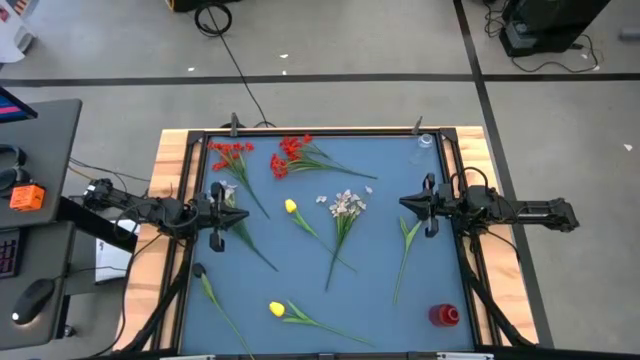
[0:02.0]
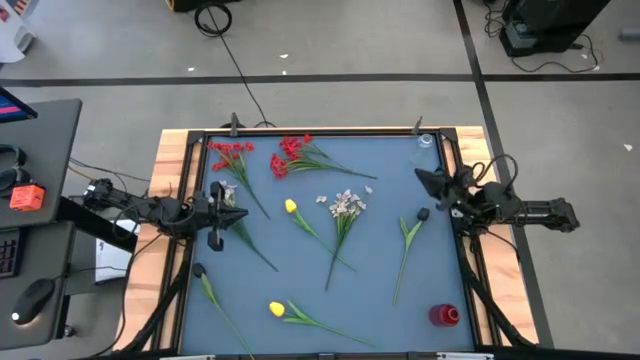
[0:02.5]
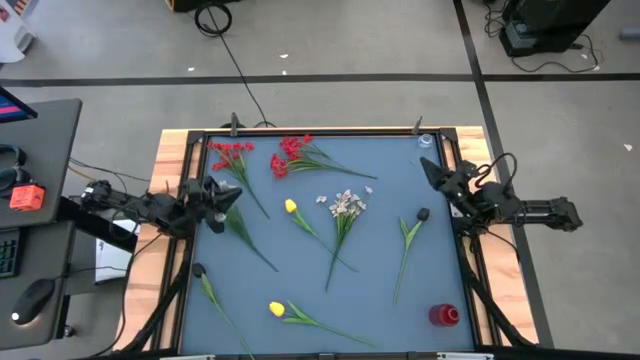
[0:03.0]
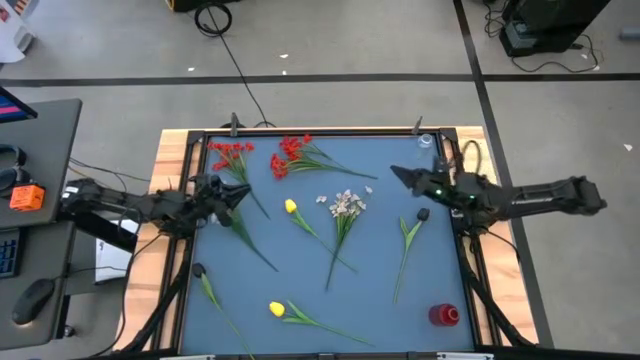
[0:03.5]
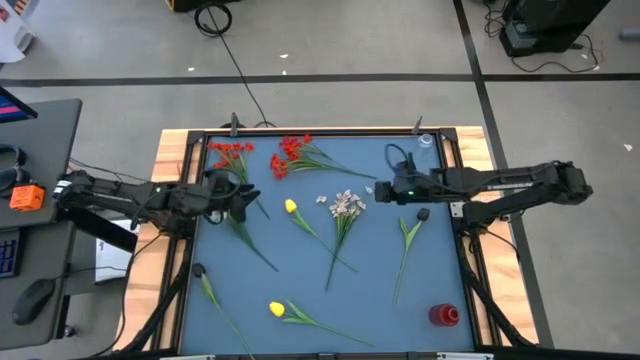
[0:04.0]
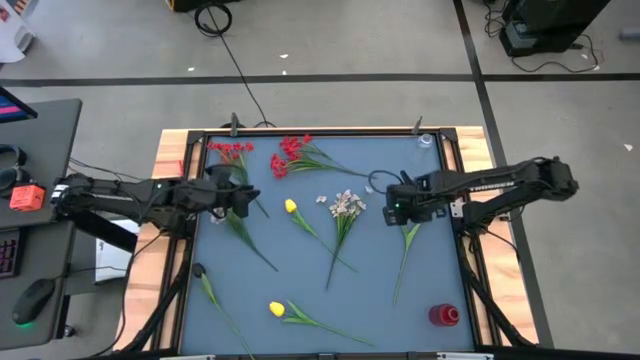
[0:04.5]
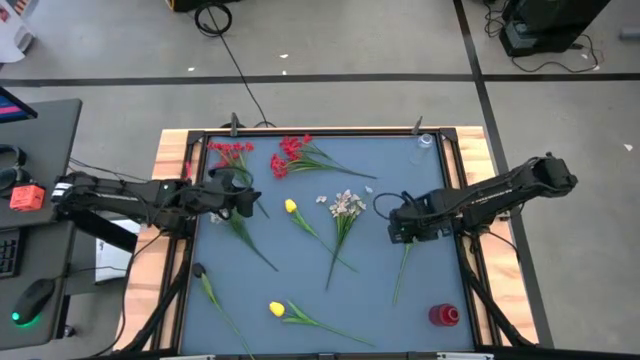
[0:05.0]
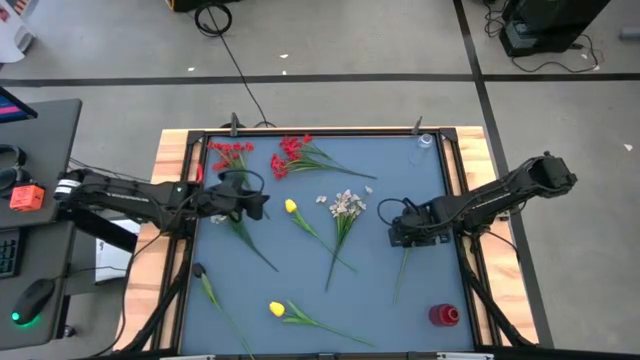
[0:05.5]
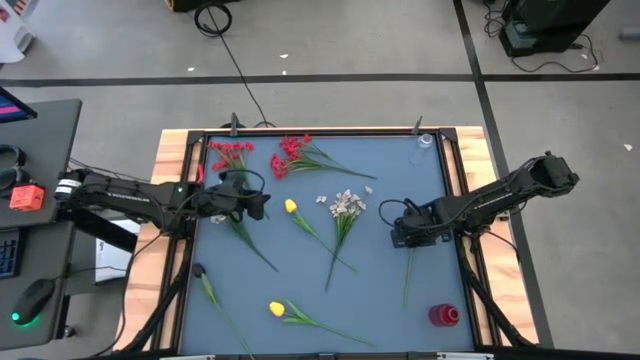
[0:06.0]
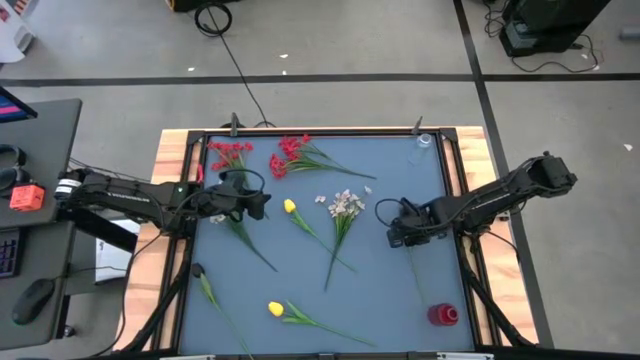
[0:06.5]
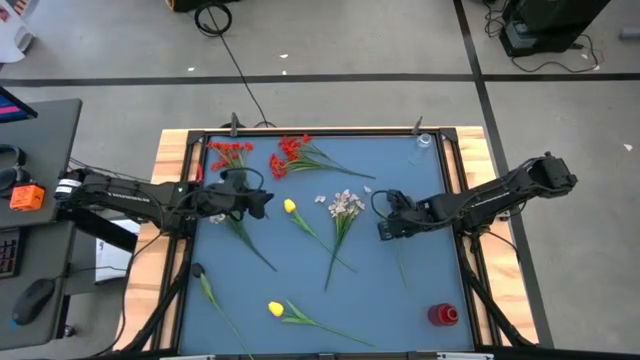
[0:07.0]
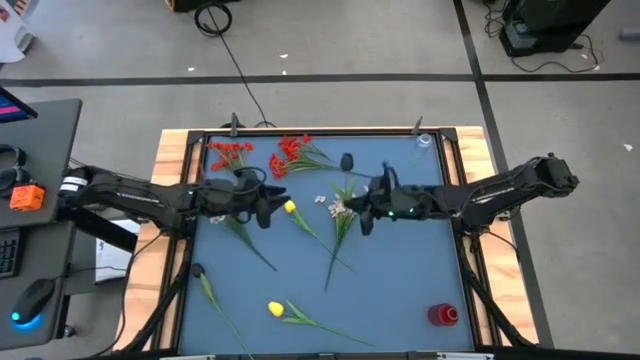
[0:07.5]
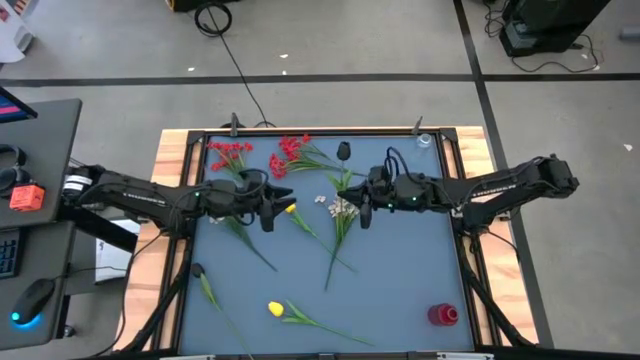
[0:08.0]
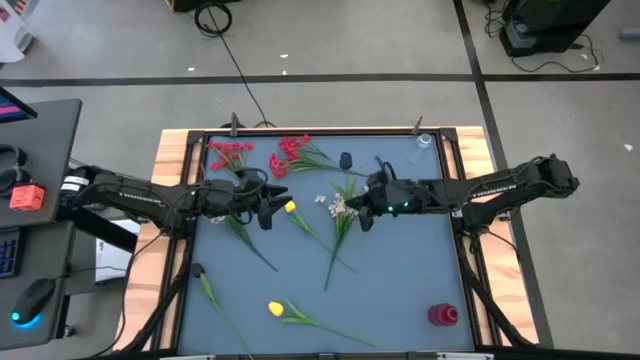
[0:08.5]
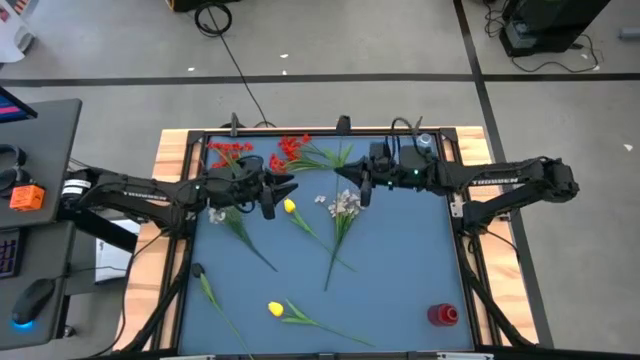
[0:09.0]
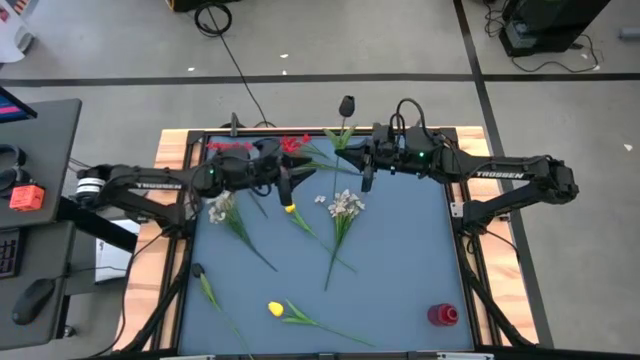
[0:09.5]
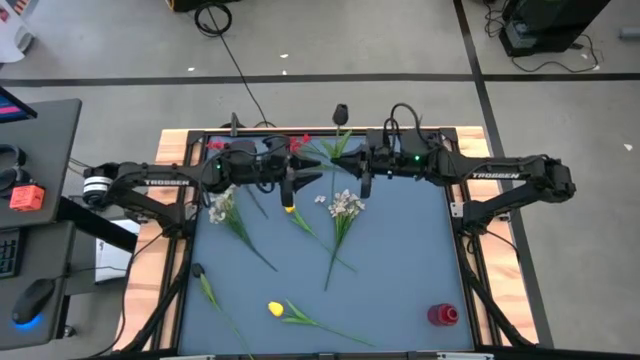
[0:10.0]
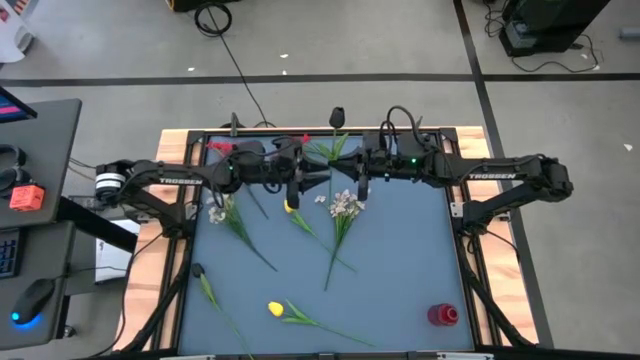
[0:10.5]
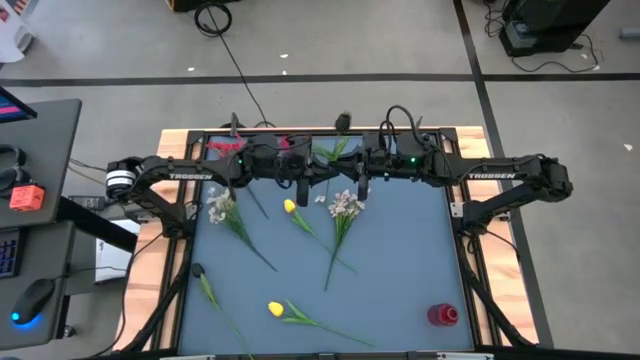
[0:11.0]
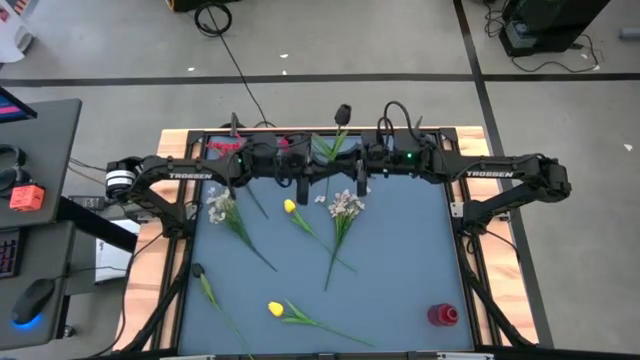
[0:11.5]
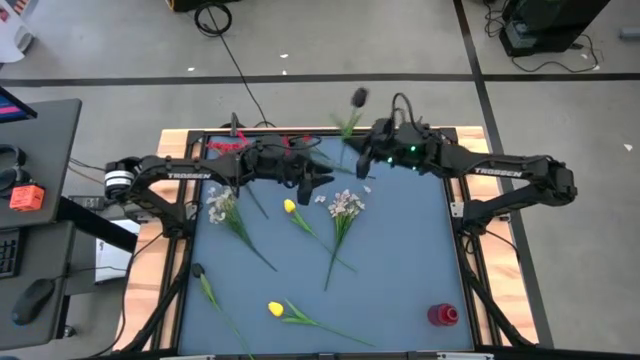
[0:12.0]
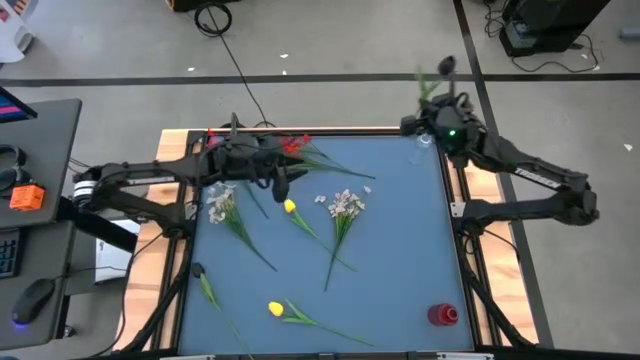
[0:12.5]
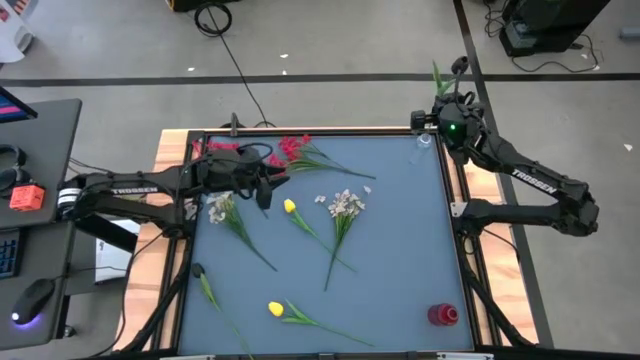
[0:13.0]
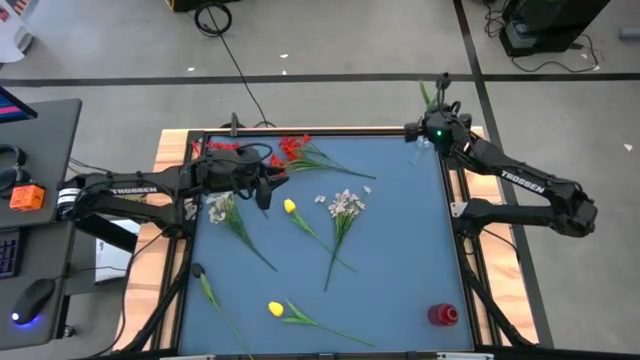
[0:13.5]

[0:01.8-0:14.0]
Task: Sort flowers into vase by color
Put the right black flower into the transparent vase

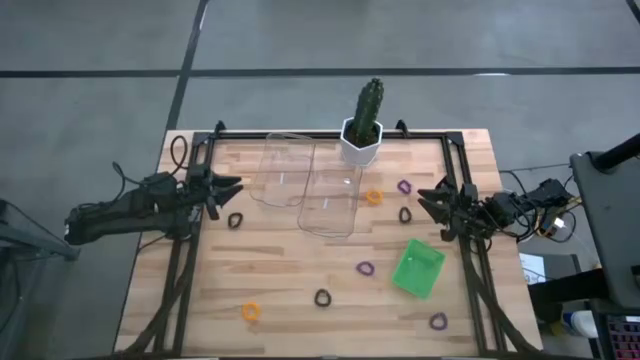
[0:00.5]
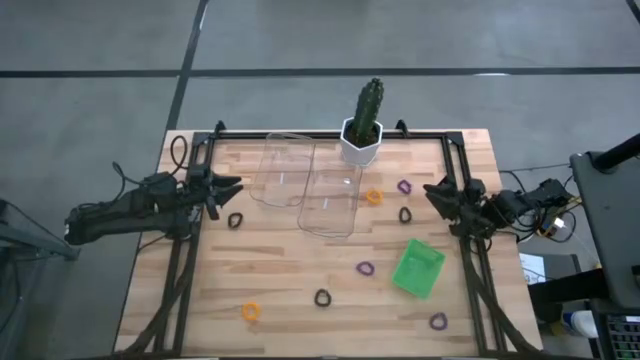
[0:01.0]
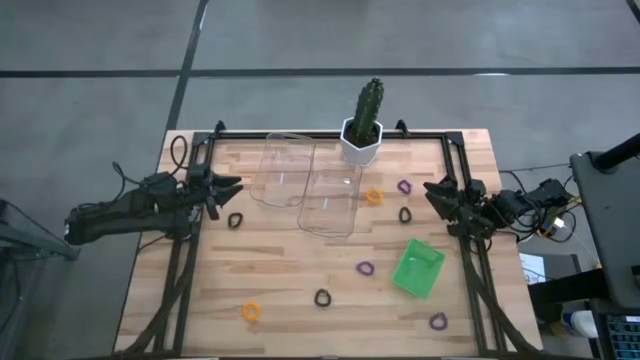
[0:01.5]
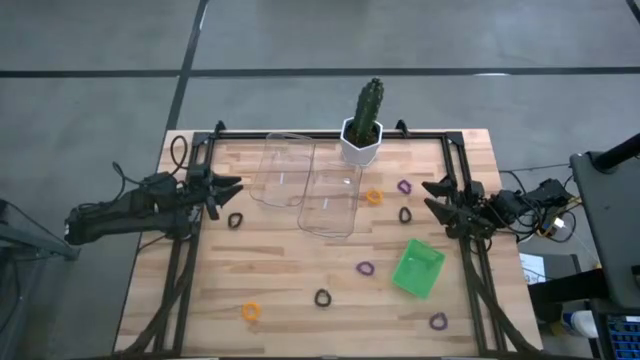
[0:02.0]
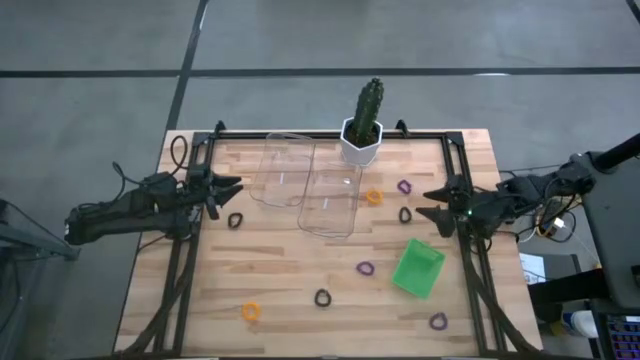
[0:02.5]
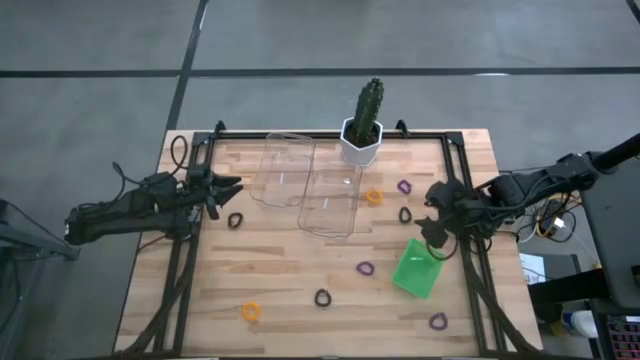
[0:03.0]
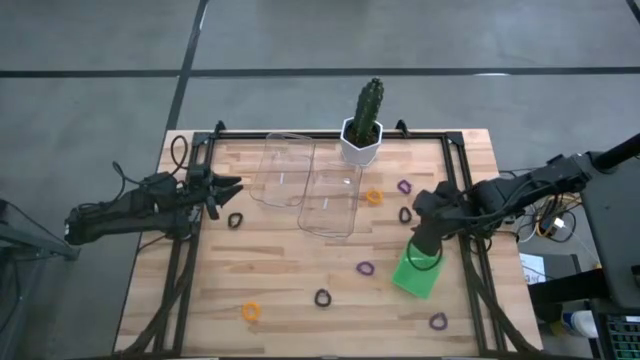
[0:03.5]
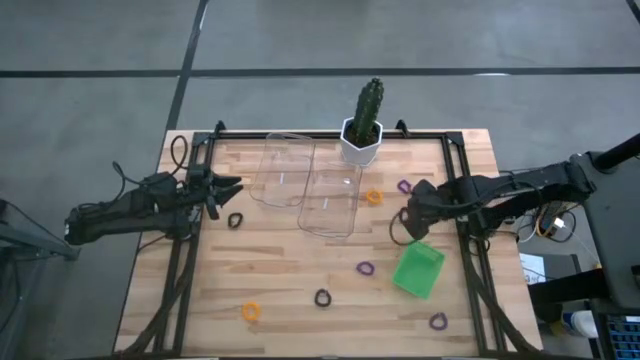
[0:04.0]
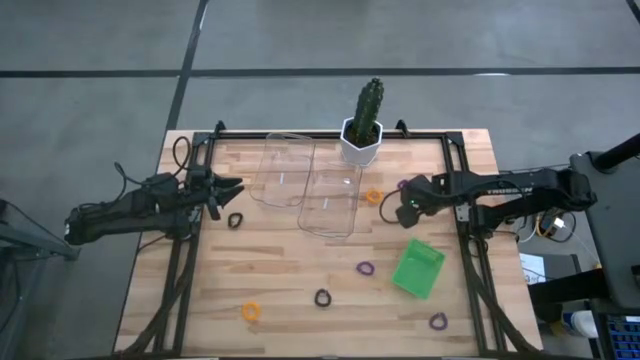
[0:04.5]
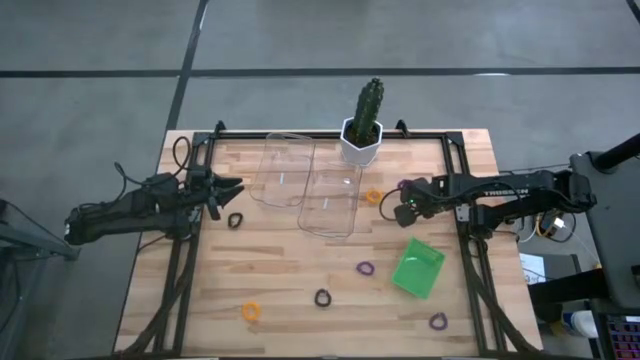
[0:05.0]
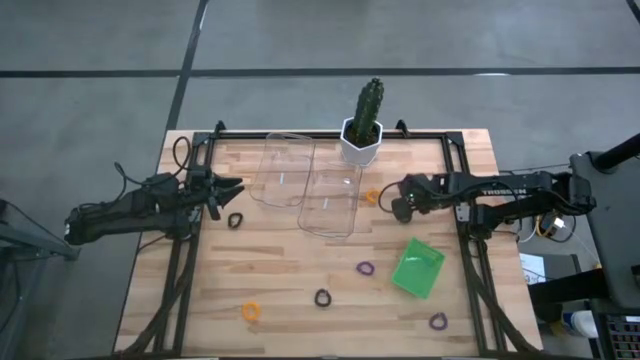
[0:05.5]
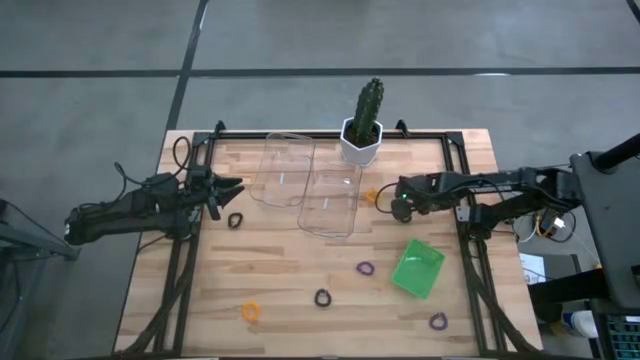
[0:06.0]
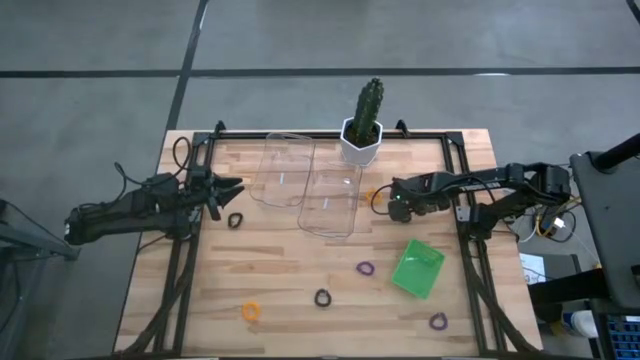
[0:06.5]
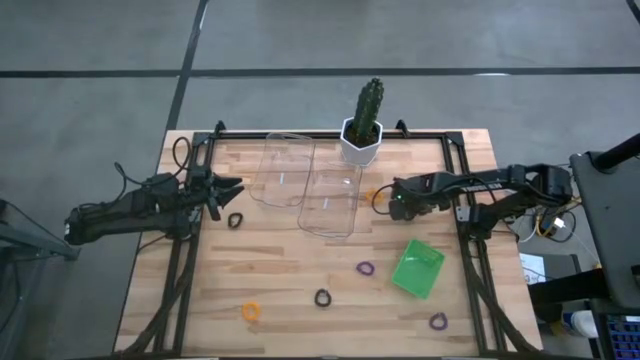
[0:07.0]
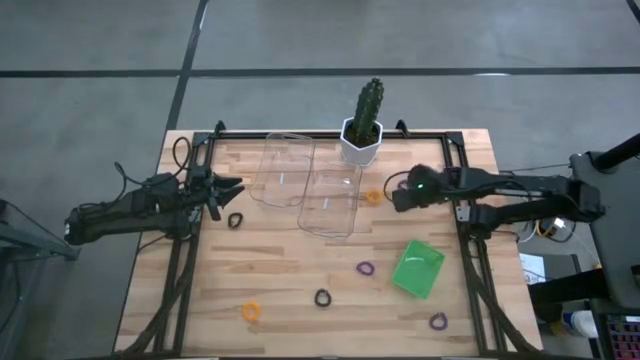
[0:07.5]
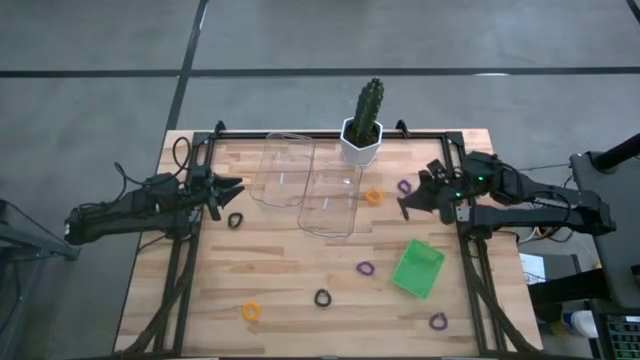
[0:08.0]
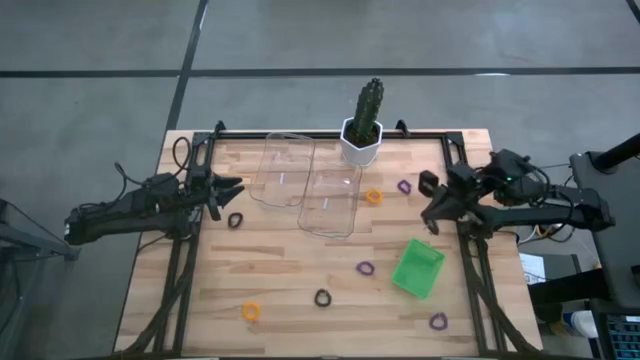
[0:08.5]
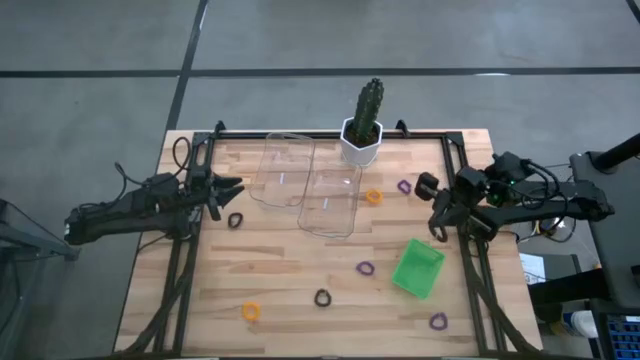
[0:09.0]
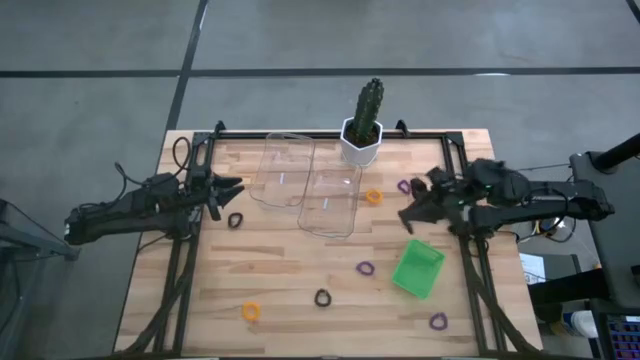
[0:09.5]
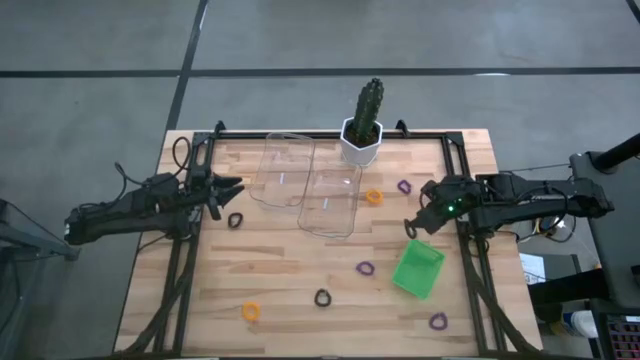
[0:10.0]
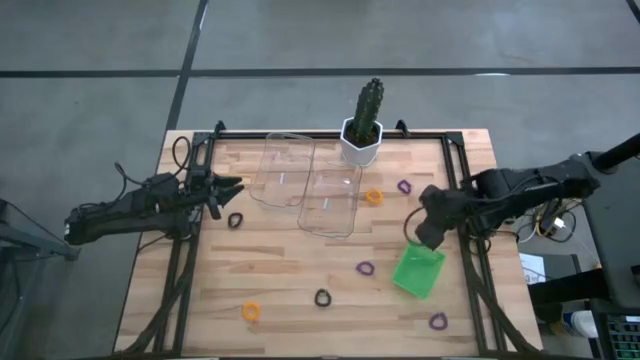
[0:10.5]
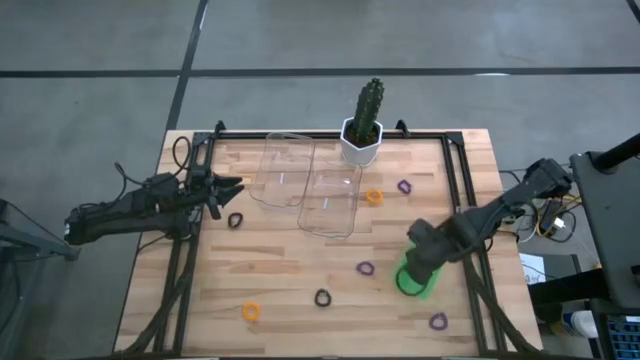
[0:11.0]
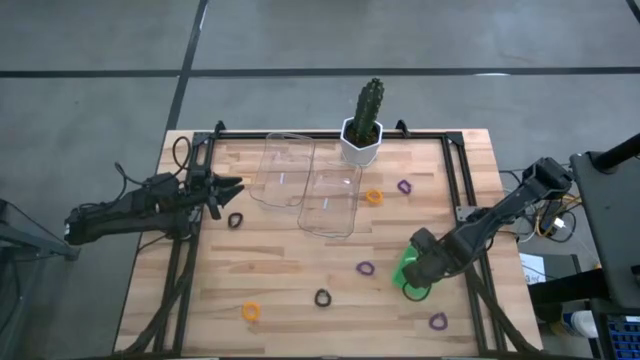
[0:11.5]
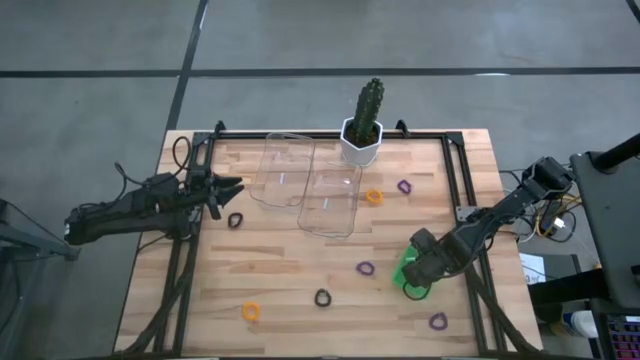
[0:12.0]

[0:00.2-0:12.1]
Task: Sort spring keychains
Put the right black spring keychain into the green bin
